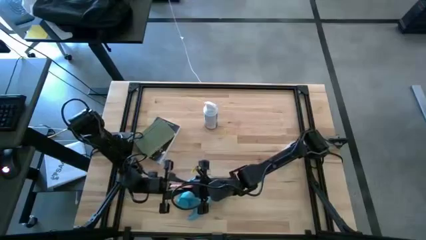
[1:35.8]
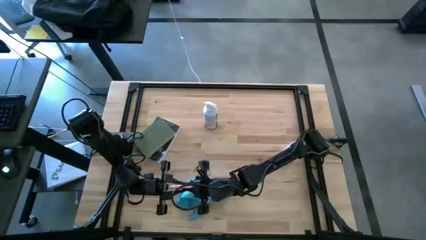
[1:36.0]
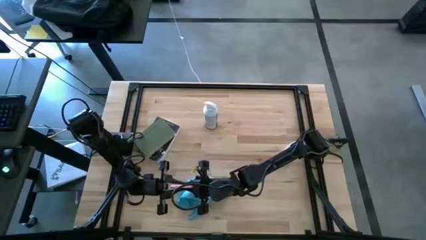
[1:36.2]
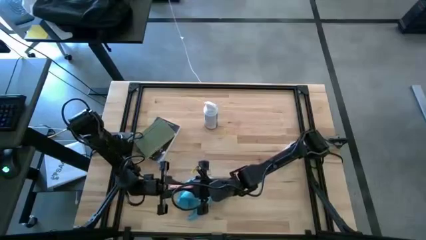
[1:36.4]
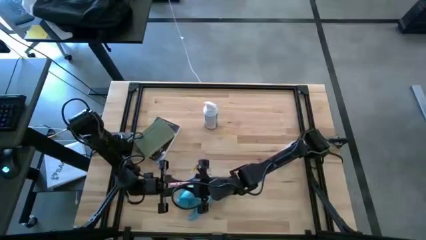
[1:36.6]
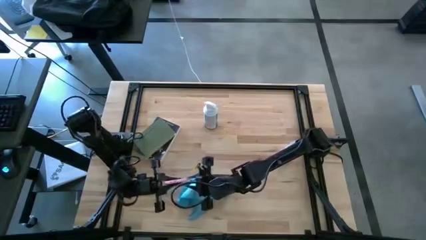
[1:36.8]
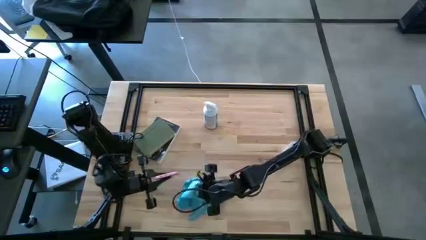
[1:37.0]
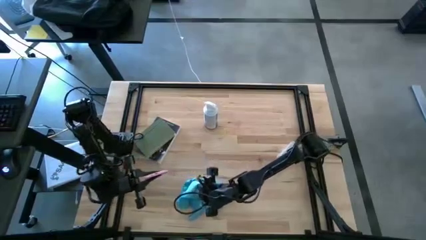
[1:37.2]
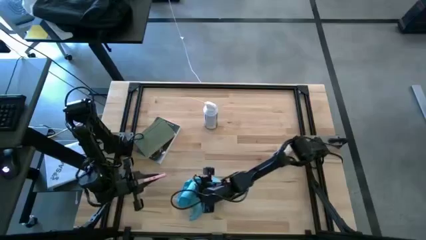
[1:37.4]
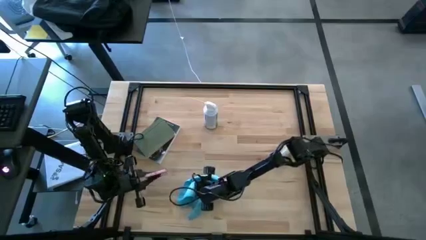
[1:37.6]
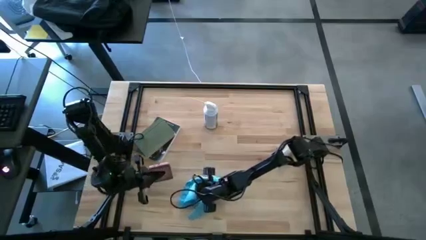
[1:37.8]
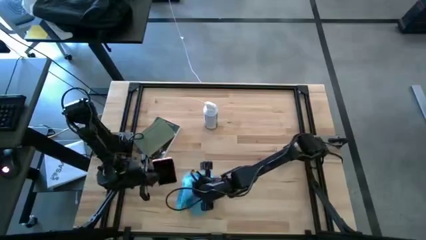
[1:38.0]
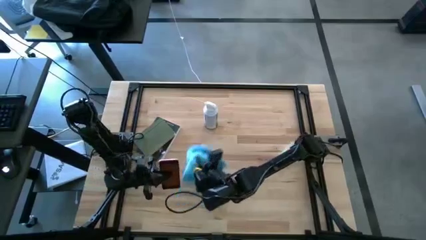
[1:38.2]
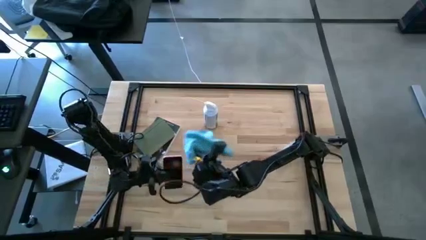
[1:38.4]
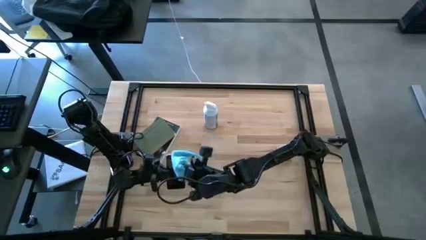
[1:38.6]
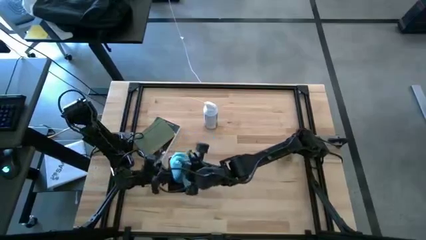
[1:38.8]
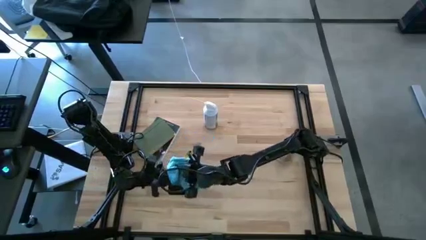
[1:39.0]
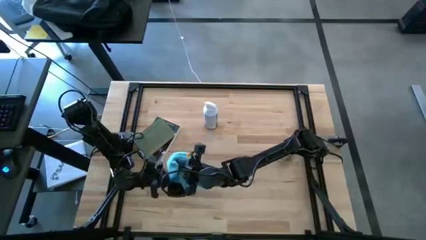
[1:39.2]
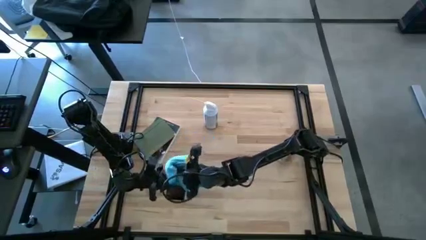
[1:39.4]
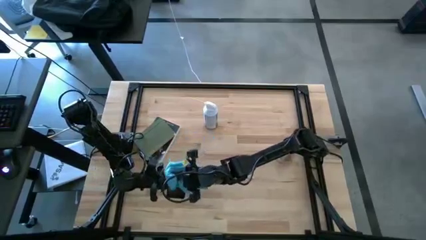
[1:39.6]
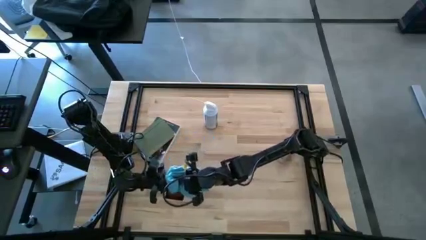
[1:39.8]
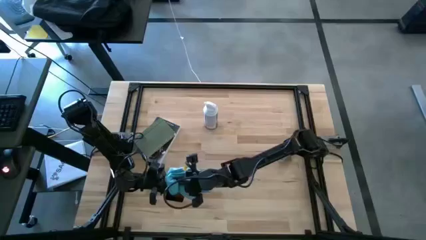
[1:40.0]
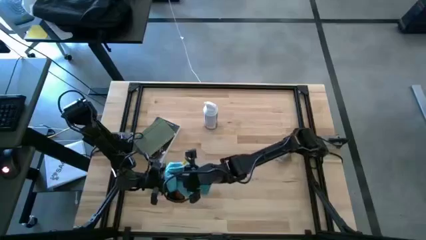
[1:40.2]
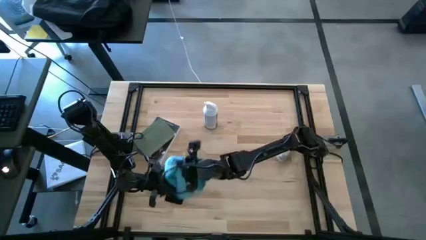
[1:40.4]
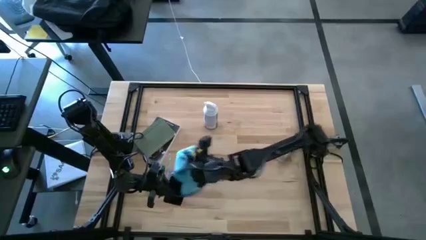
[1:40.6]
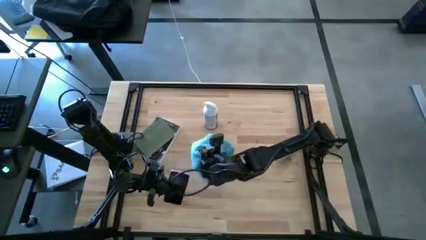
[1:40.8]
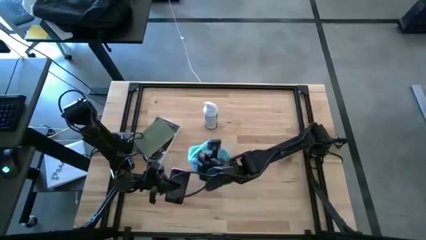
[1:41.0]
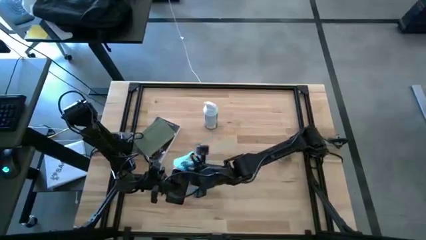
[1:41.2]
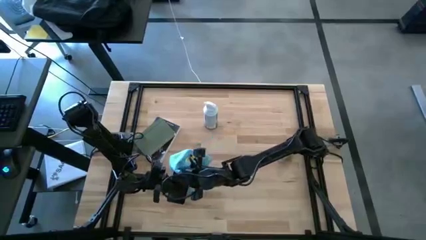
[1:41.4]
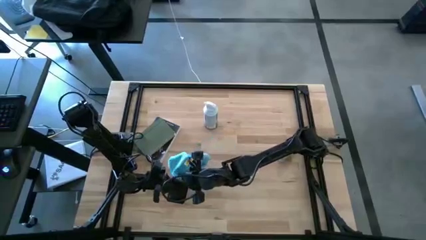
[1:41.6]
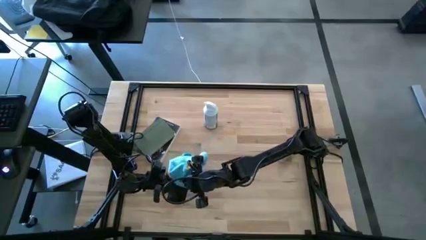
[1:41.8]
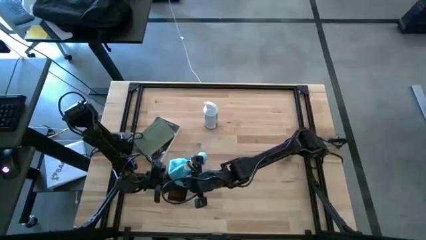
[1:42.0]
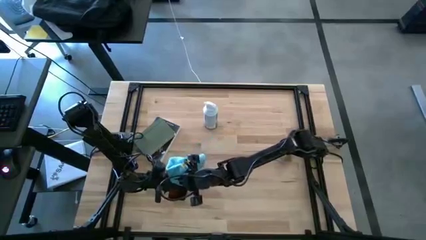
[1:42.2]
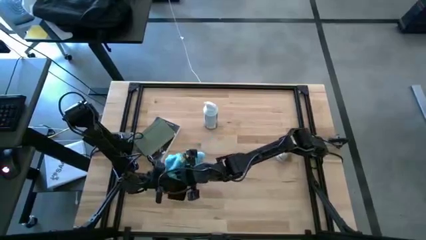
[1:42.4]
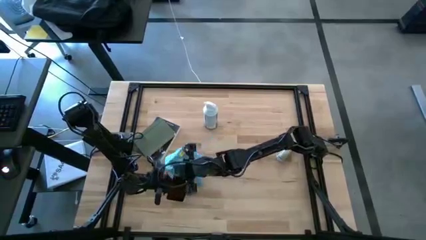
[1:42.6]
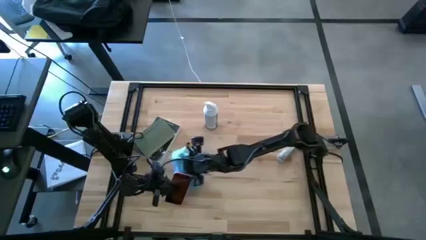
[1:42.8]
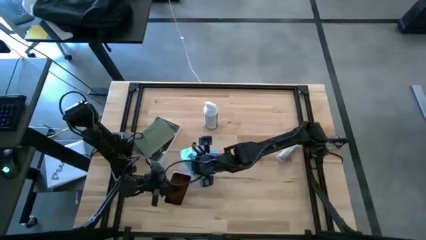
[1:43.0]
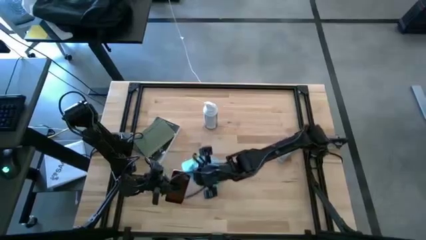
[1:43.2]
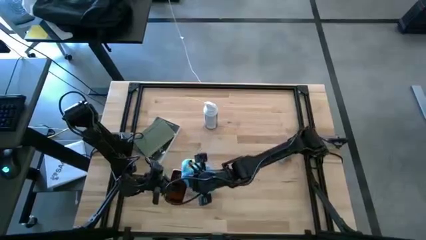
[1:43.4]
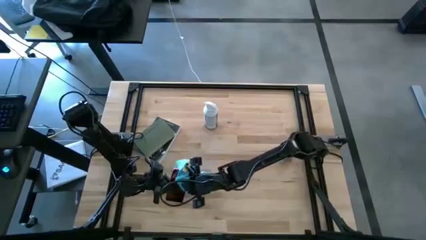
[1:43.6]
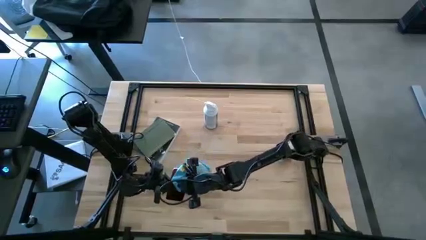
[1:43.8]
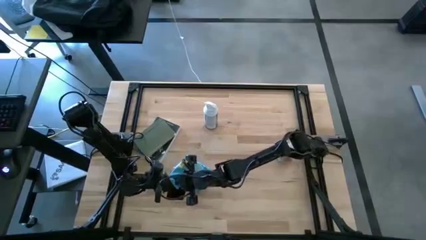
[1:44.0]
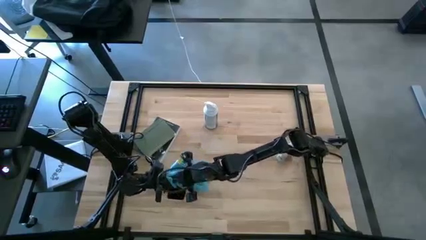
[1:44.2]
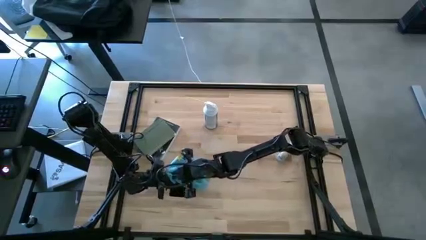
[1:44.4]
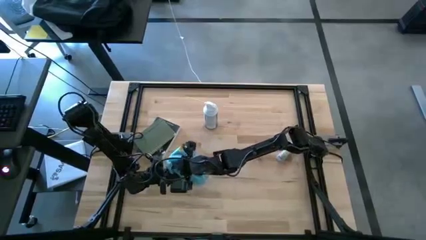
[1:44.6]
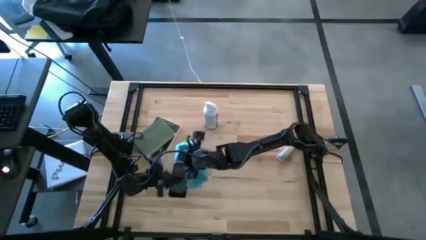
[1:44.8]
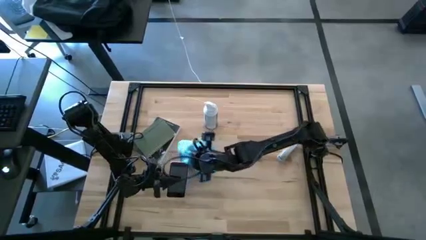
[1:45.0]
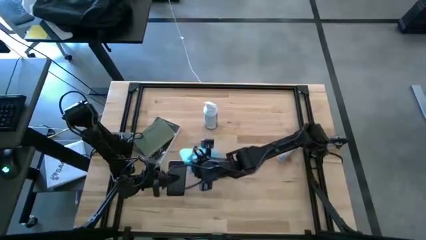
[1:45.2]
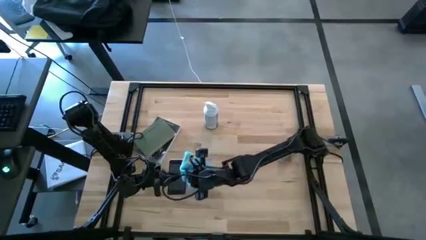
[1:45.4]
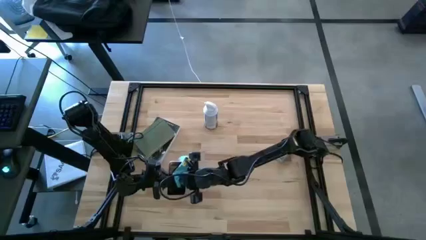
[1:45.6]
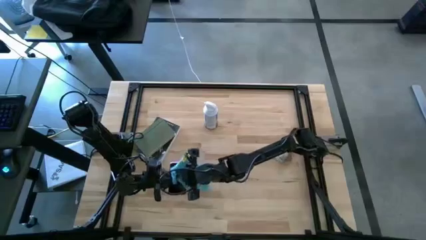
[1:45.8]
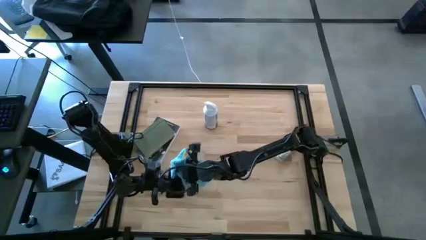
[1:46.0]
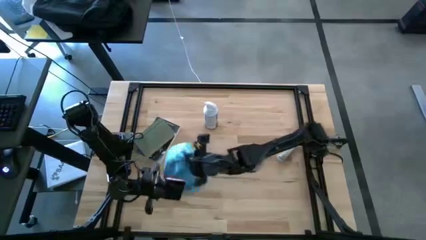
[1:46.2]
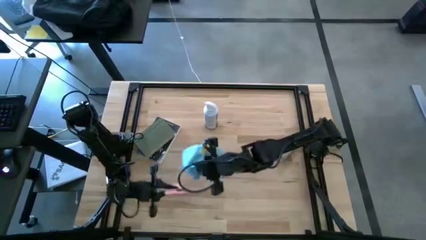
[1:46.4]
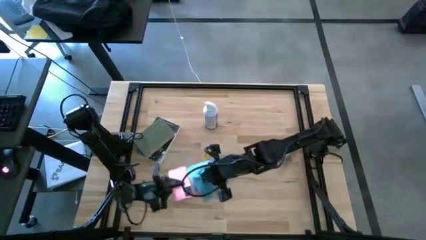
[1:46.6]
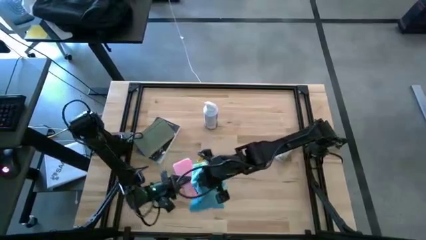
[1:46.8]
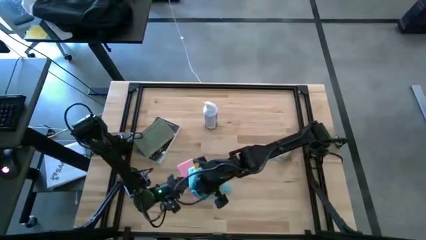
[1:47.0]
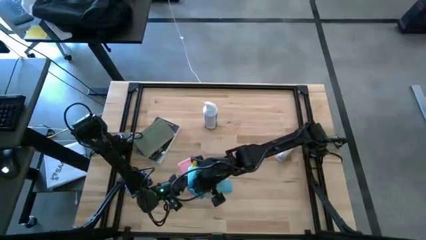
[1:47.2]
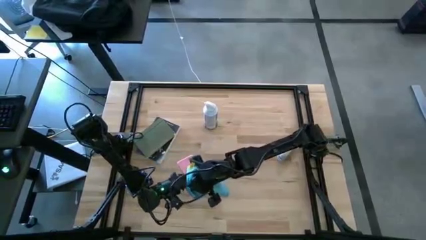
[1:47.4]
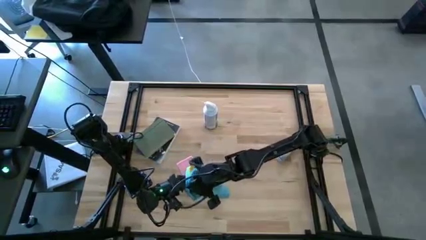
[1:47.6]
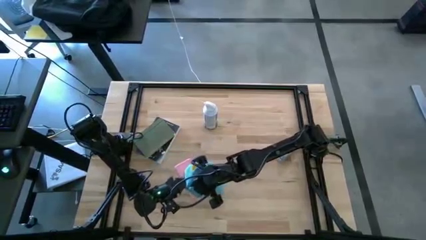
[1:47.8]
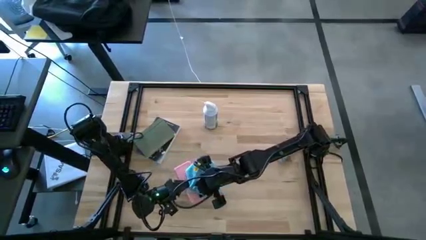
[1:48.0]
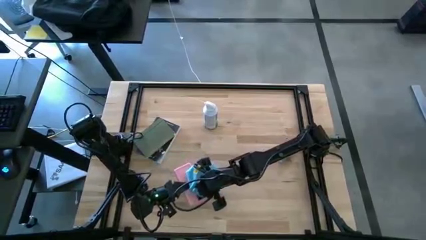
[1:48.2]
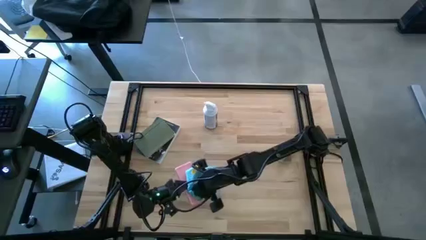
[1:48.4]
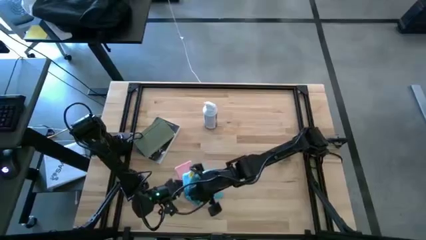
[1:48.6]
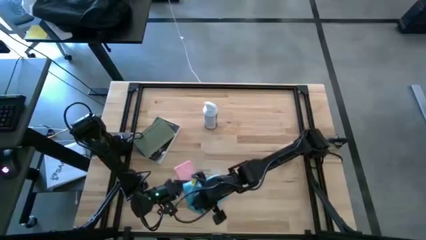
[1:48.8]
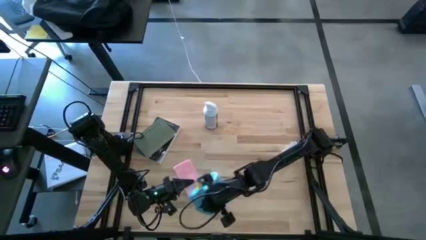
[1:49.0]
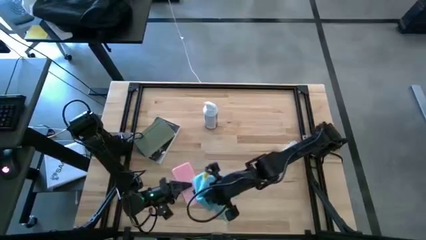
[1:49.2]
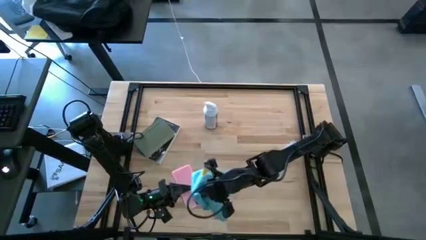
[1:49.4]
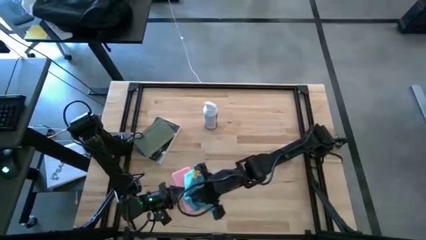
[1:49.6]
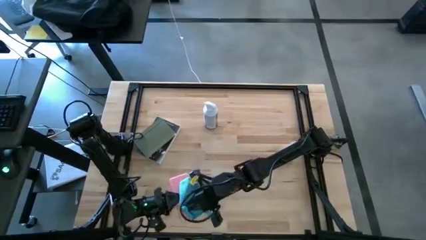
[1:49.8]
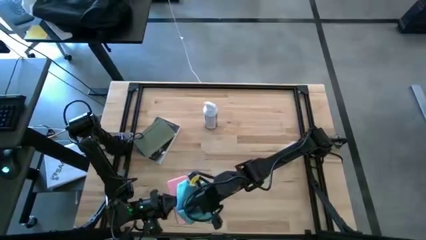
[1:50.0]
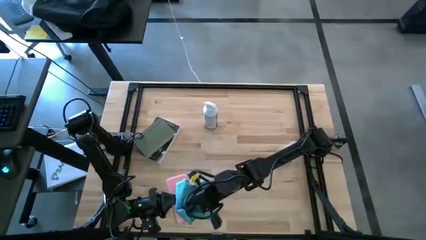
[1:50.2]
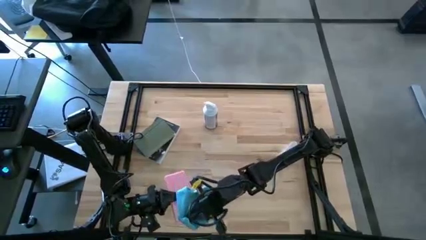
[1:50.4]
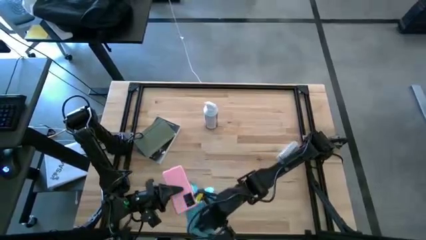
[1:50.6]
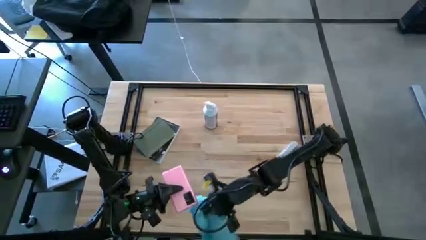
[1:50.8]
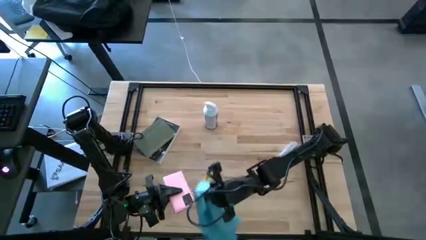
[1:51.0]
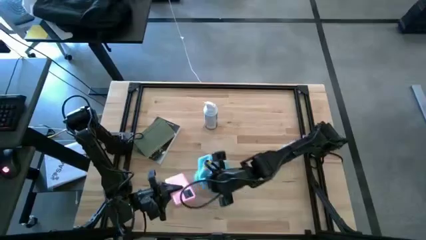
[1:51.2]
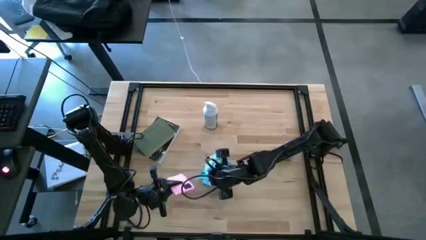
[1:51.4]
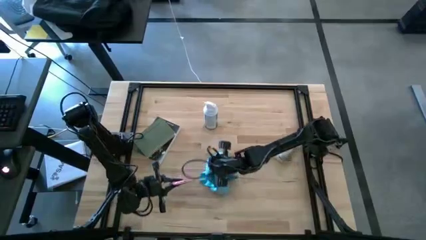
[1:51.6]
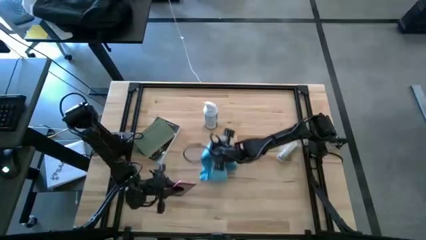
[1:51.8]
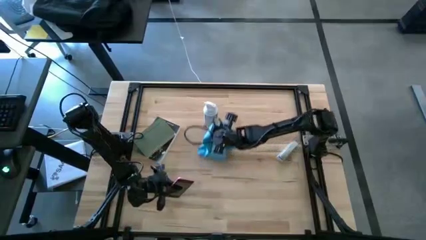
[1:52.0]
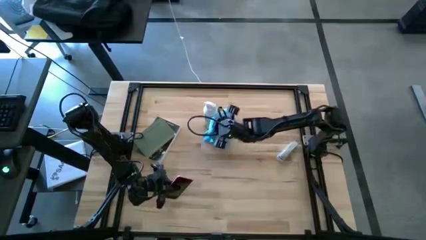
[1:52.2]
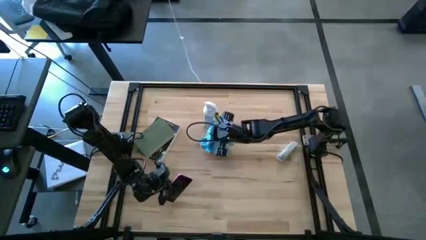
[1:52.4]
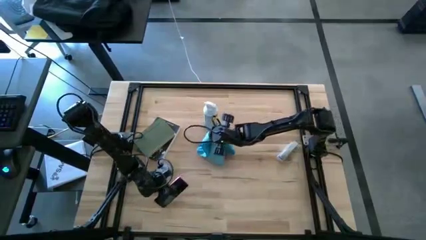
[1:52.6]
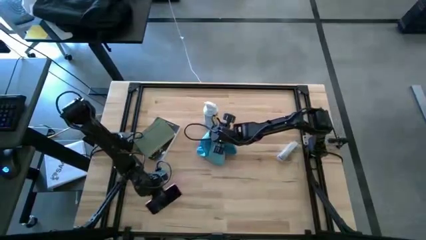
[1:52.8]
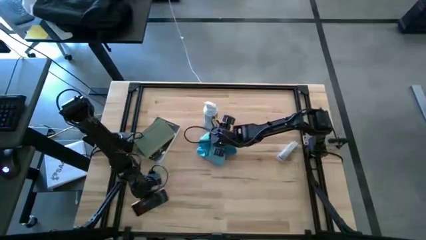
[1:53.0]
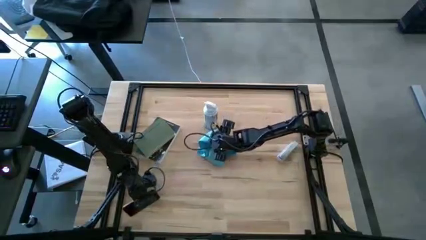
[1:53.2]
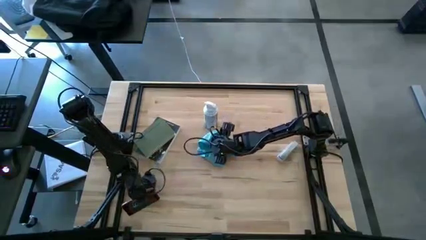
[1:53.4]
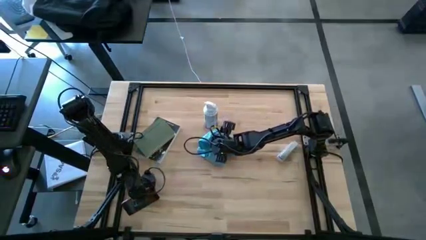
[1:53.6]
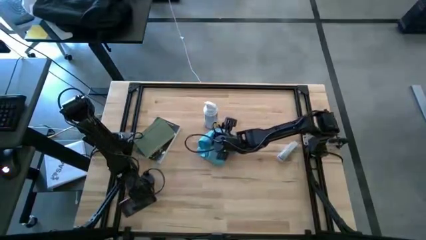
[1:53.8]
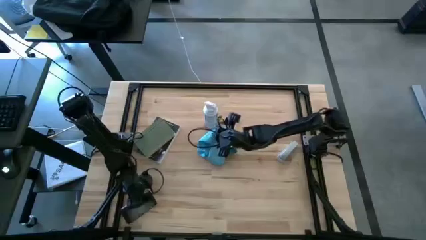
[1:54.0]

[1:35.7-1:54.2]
Task: Apply microfiber cloth
Wipe the cellphone with the microfiber towel
